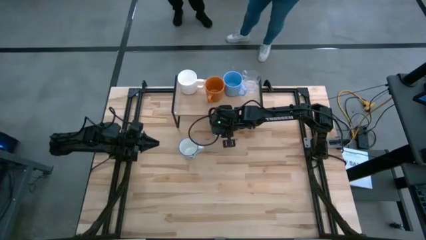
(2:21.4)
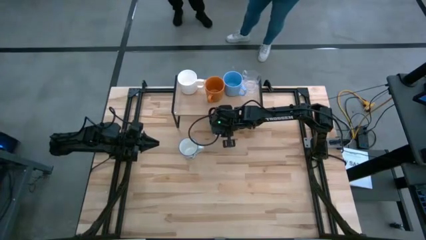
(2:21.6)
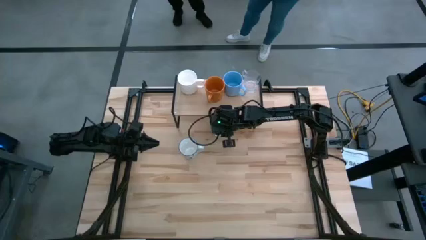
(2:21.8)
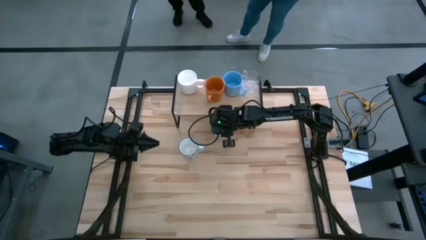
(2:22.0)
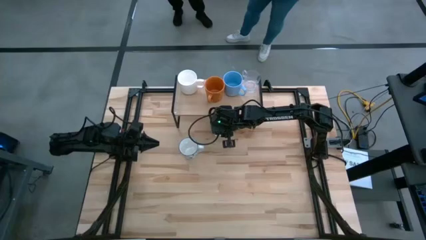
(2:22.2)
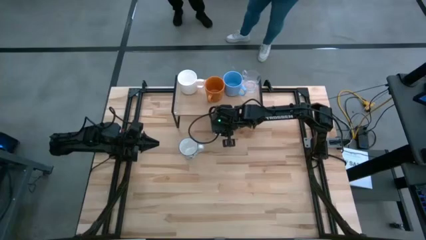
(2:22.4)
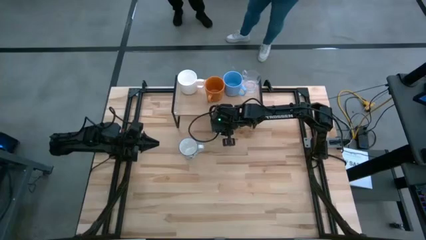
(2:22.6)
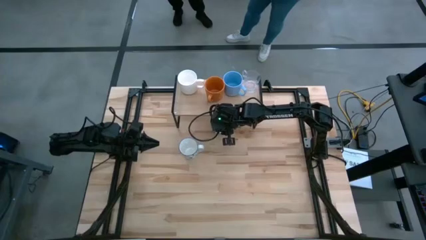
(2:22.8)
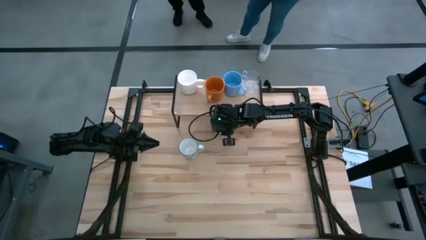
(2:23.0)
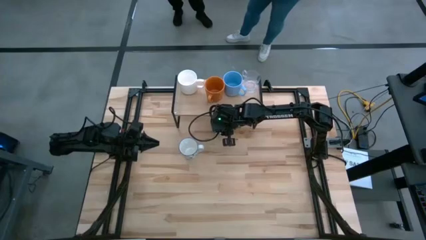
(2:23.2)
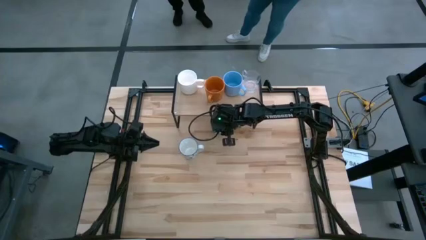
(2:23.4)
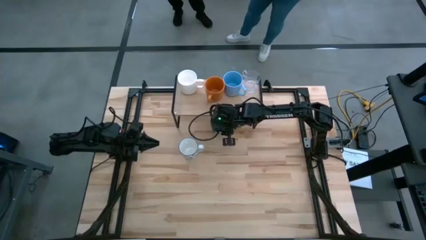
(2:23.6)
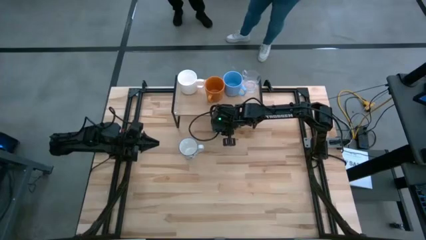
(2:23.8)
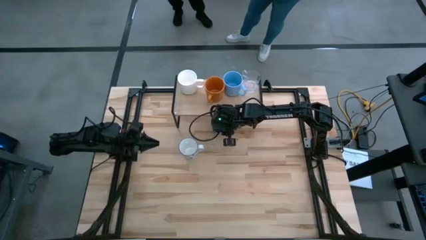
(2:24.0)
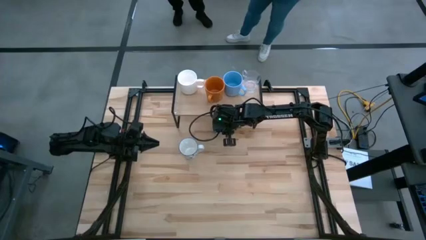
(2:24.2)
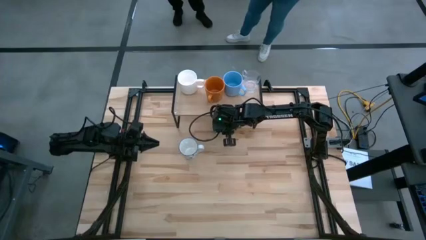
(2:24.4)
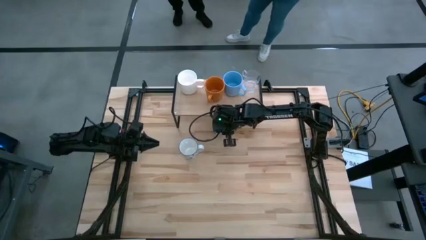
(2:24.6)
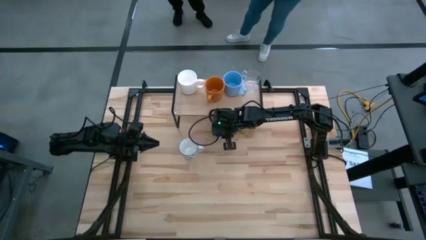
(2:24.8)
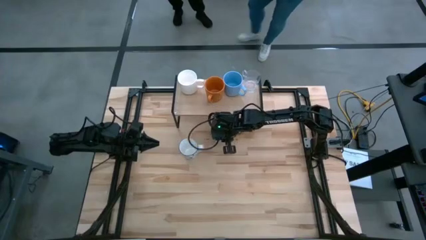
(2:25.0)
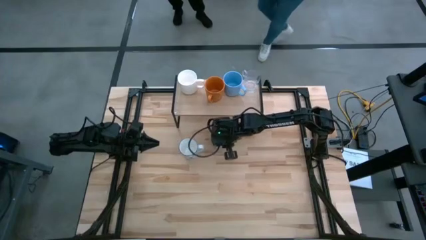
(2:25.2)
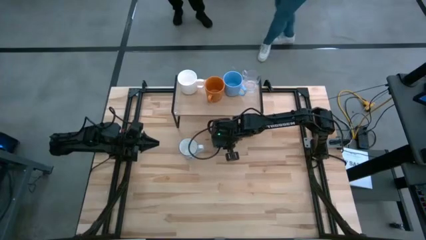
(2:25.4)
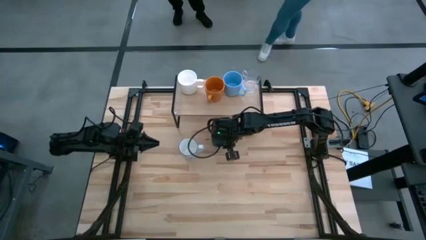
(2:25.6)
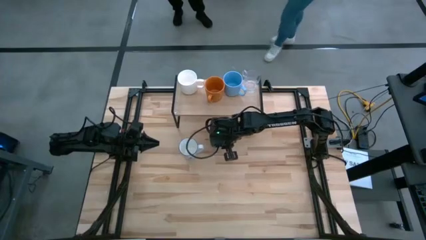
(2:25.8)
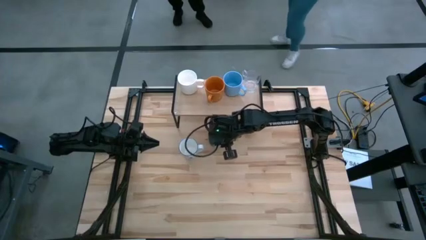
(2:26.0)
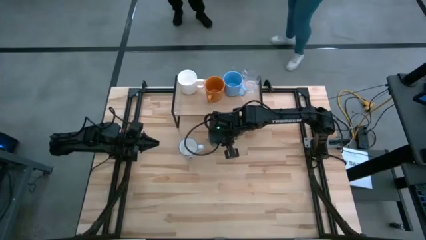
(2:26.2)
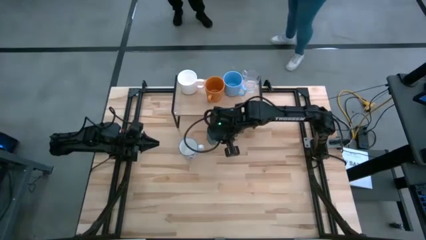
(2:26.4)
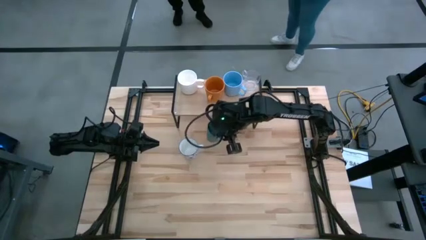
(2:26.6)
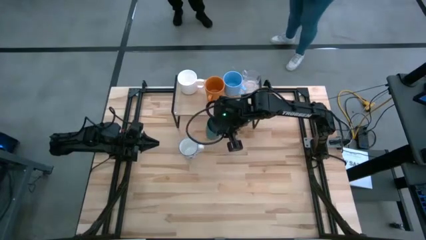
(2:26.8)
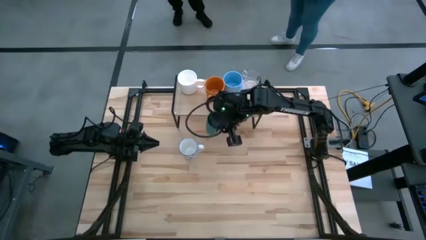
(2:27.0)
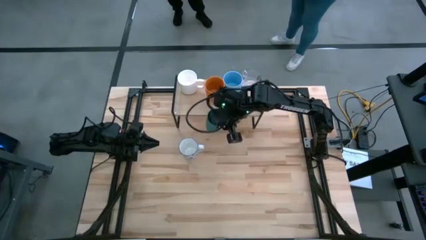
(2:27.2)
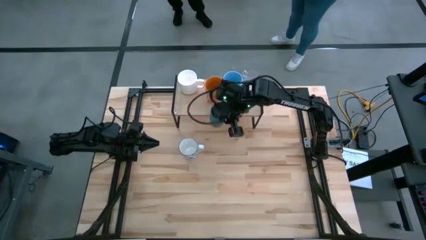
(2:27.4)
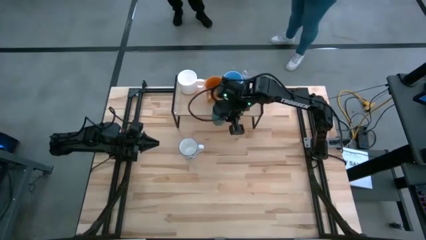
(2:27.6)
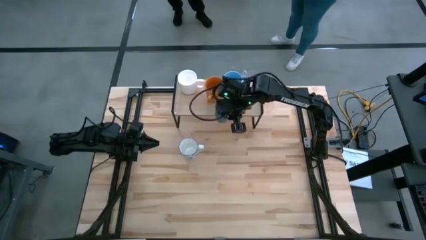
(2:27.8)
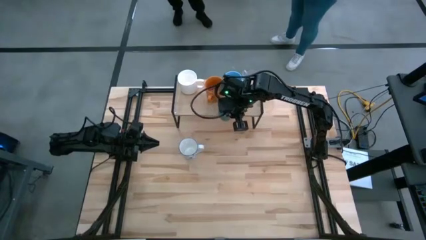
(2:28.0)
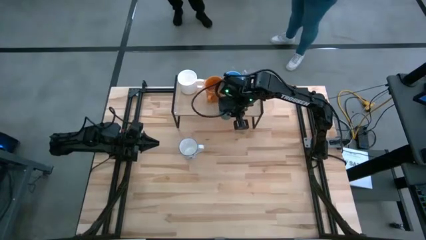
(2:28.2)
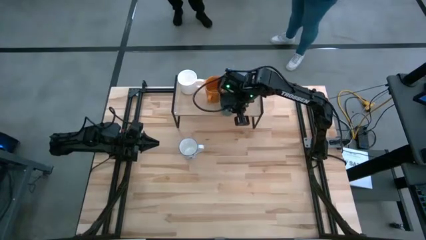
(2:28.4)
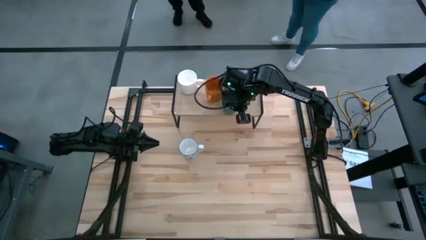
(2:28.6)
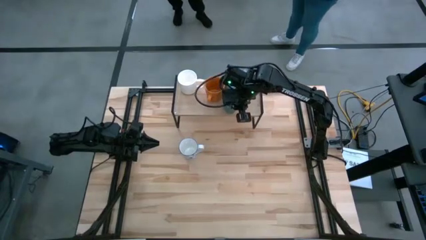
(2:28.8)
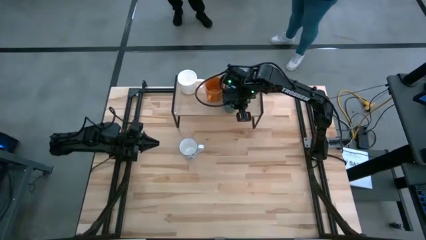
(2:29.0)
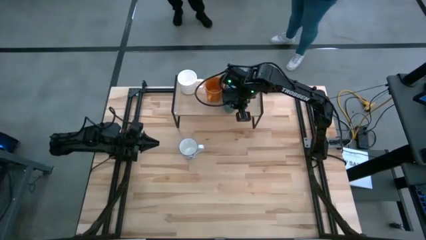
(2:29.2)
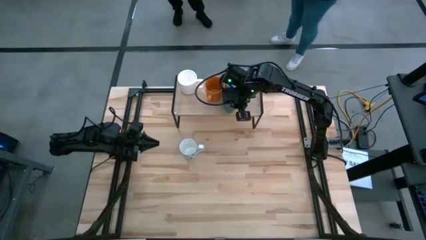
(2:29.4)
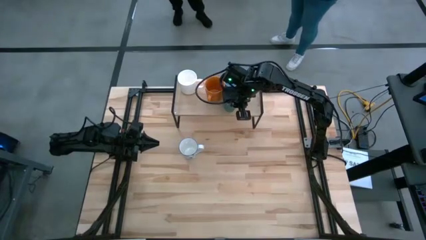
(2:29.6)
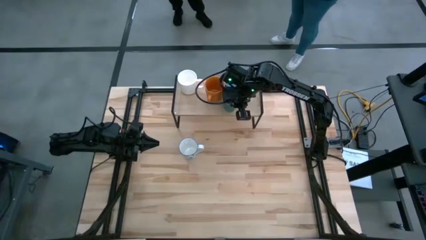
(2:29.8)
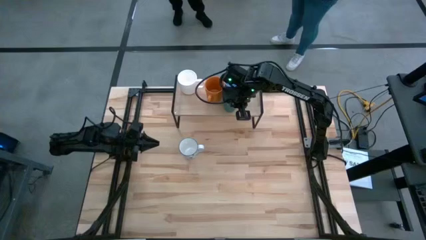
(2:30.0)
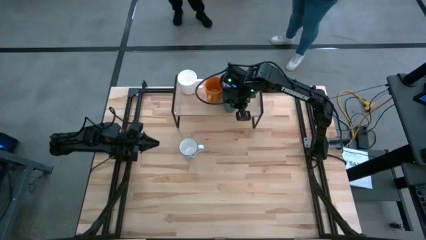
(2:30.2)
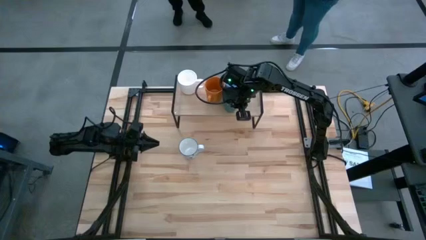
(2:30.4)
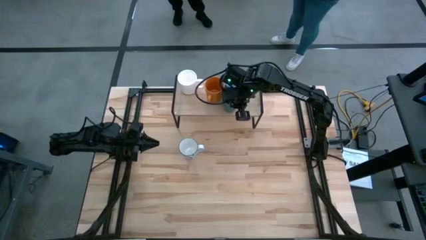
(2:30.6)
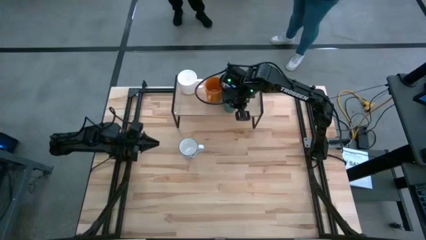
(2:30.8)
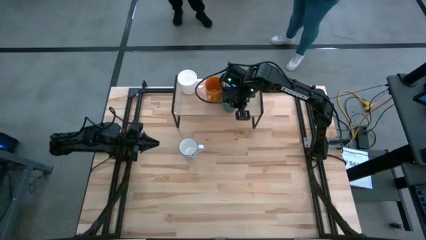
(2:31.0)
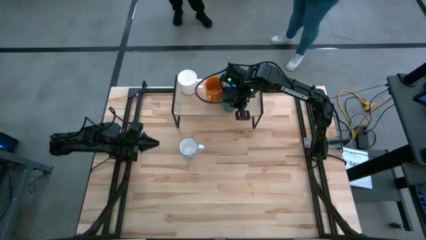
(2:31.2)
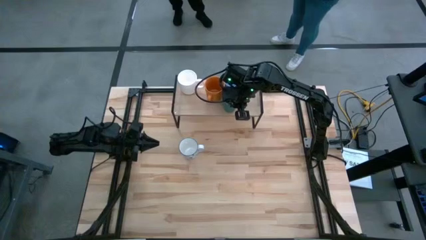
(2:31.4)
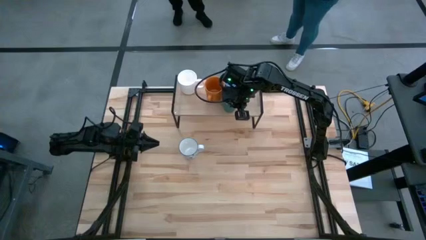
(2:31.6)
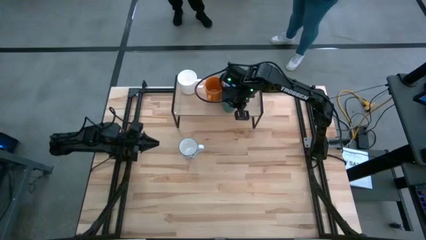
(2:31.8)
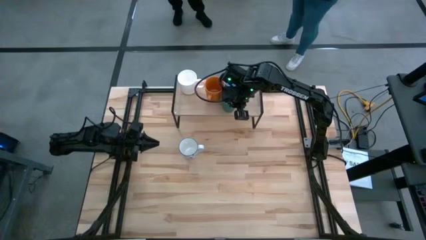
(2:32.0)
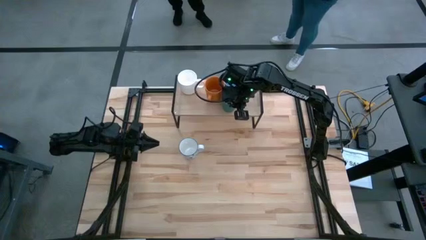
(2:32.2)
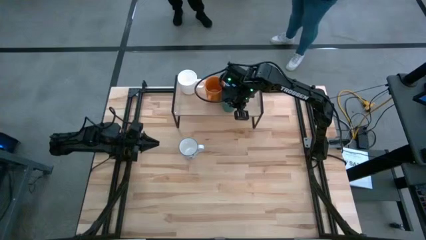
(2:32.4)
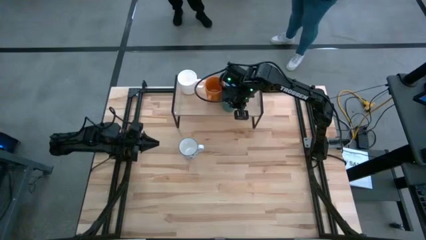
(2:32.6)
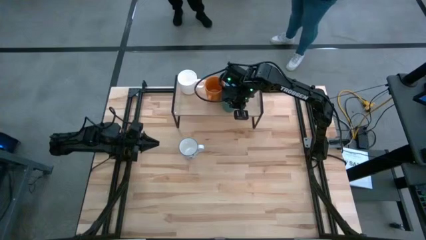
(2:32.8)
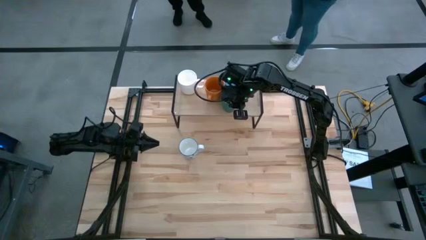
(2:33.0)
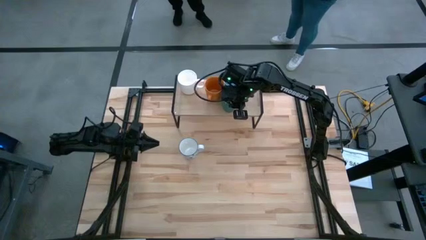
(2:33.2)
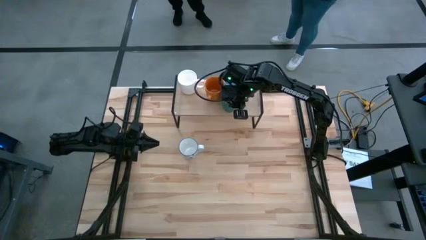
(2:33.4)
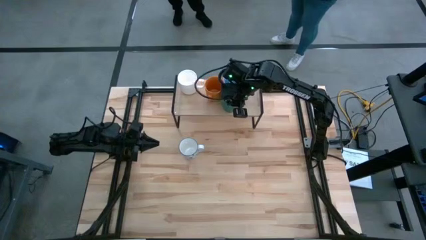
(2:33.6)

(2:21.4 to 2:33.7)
Task: Stack small to large cups/mugs on shelf
Put the green cup on the shelf

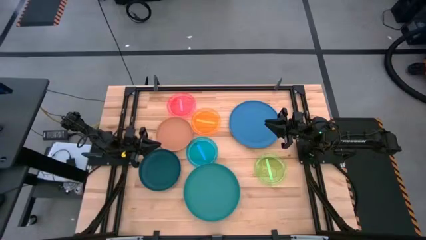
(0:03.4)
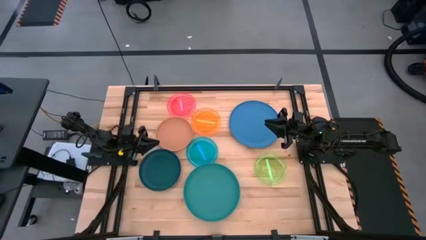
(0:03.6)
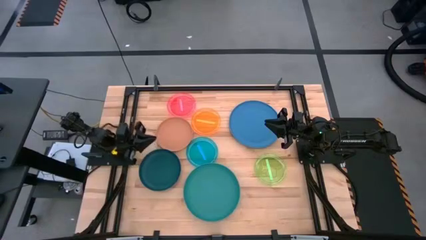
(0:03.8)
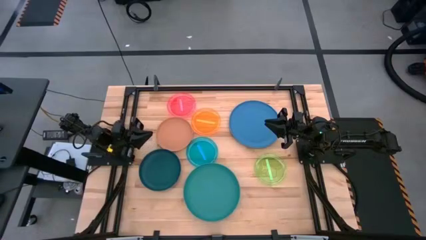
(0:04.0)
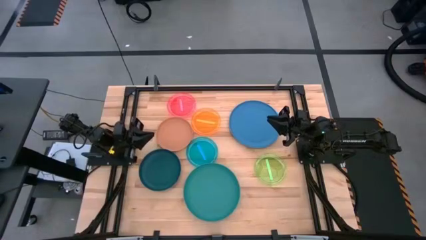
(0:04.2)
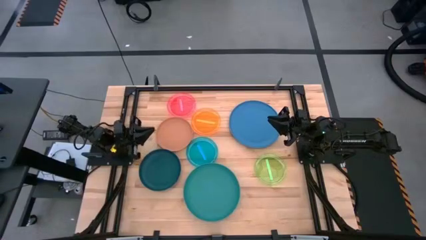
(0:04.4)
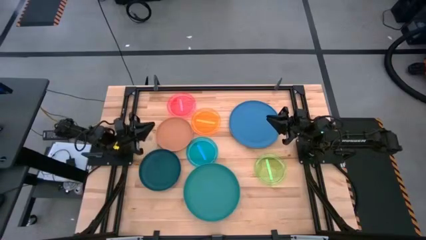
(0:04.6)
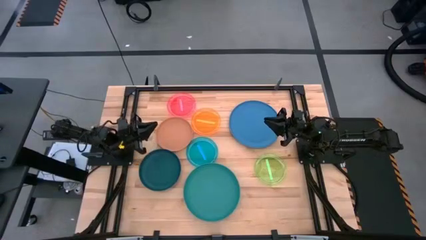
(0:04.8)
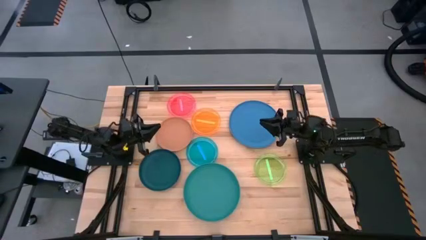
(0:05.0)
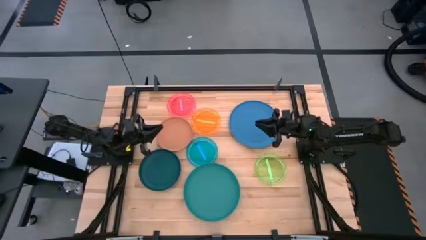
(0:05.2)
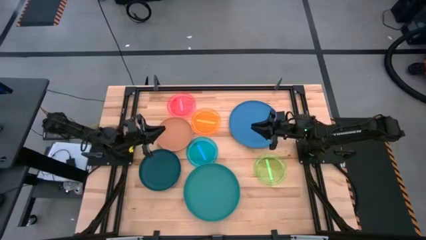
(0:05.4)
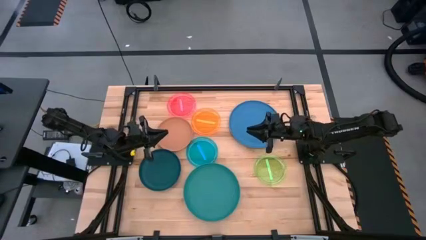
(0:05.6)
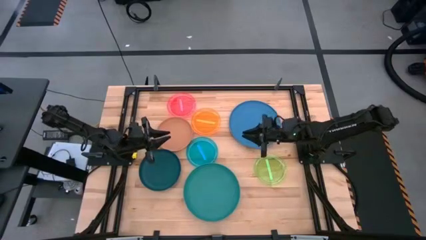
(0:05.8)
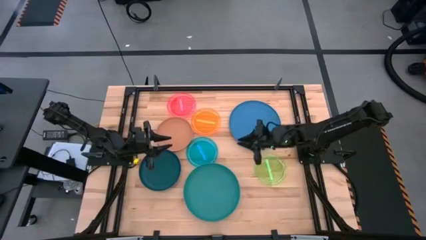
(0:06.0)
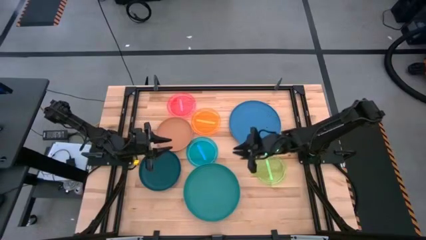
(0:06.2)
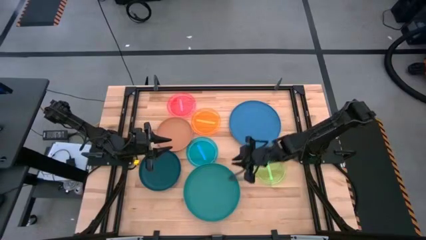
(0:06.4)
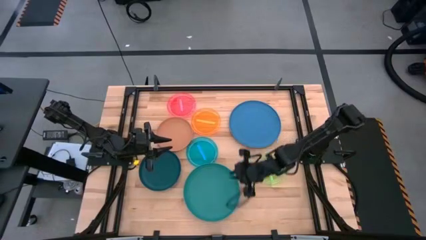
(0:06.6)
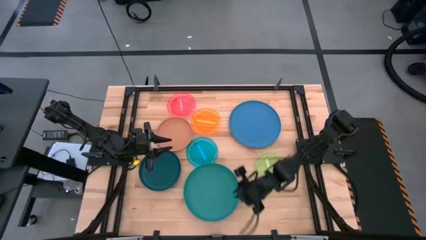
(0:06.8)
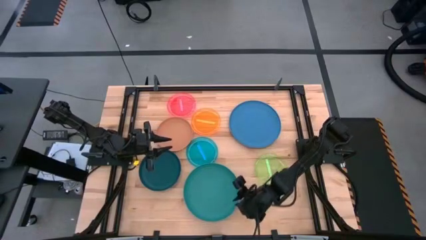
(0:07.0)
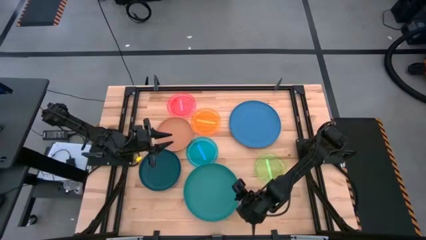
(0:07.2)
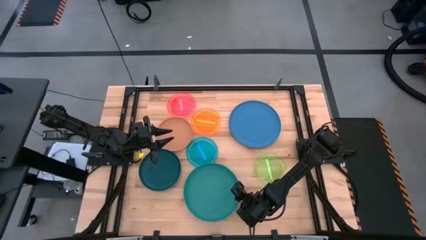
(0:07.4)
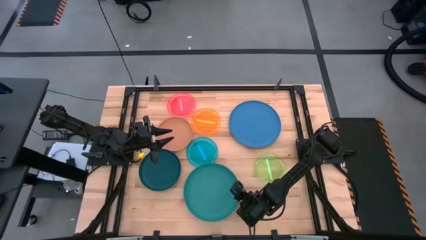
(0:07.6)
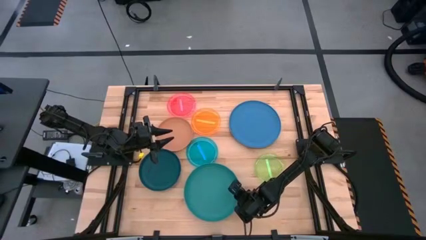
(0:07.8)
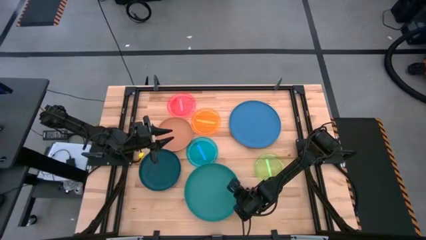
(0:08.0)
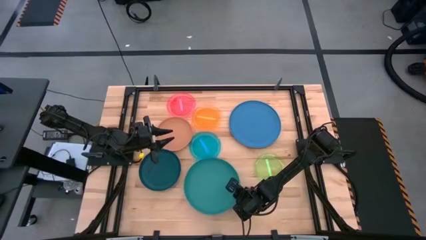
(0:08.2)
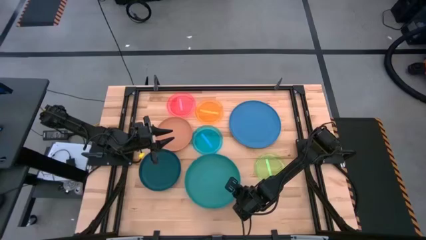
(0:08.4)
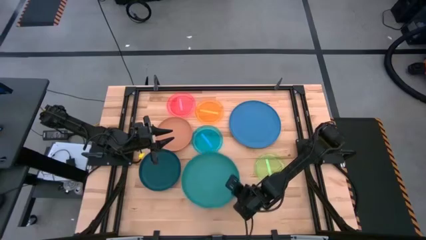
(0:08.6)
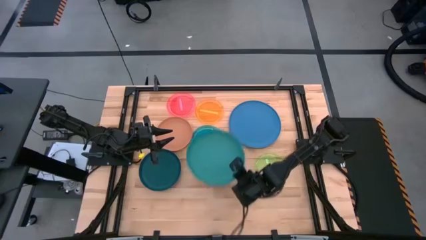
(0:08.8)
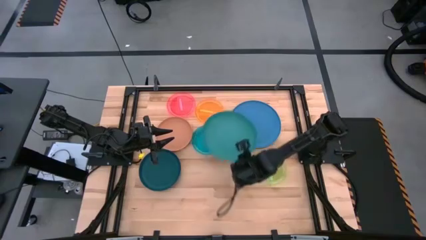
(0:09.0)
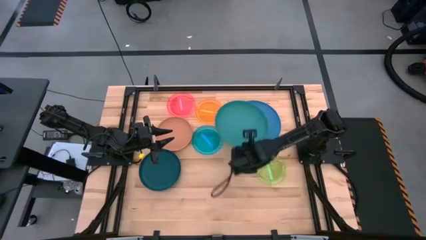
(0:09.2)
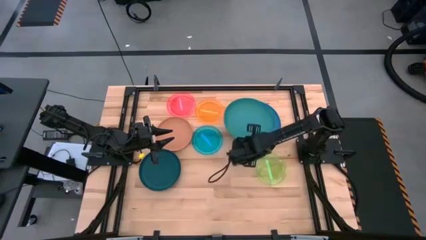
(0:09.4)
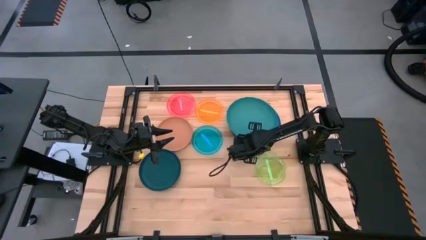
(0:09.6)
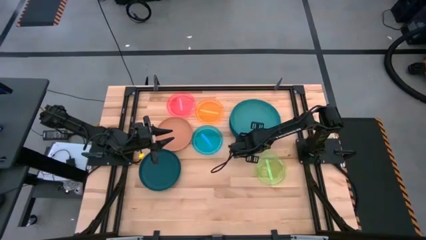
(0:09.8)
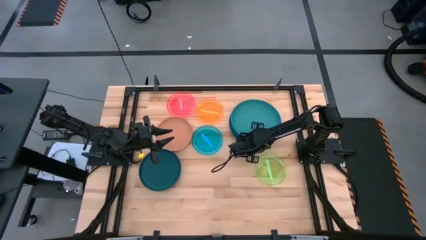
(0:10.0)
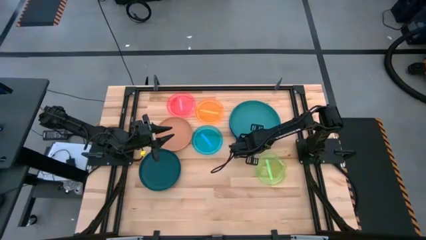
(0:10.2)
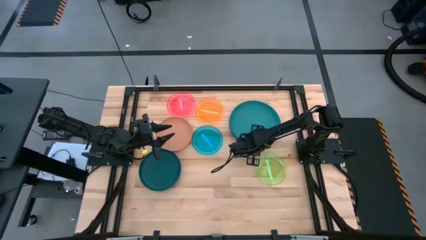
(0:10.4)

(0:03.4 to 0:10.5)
Task: Stack plastic plates
Stack the green plate on the blue plate
